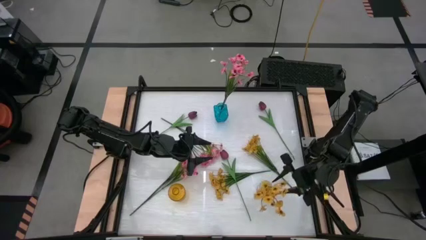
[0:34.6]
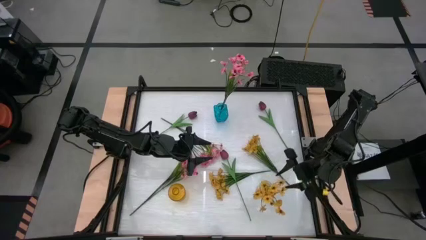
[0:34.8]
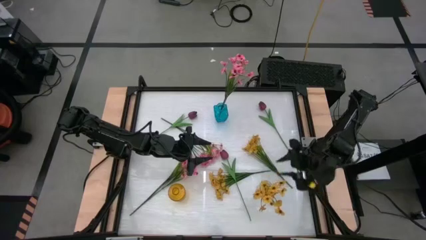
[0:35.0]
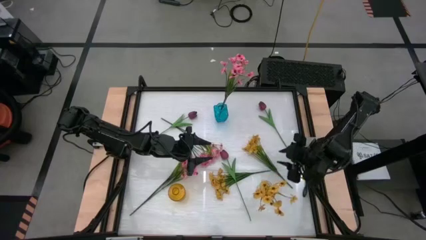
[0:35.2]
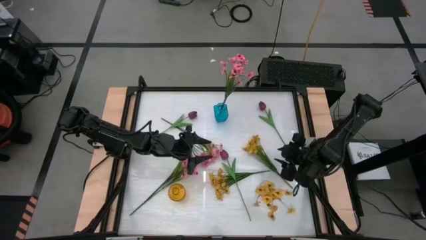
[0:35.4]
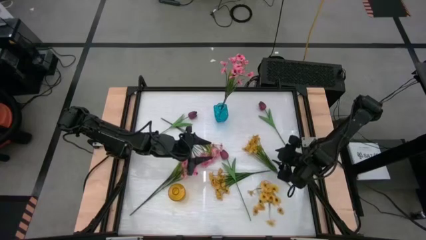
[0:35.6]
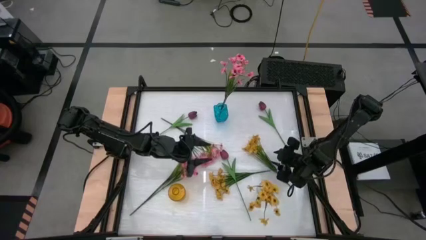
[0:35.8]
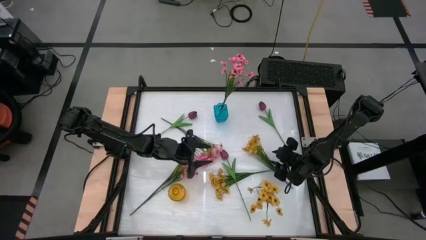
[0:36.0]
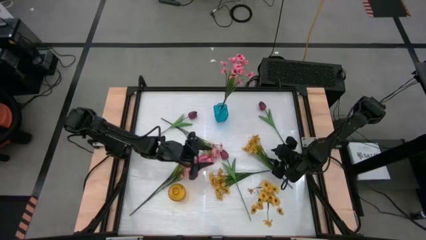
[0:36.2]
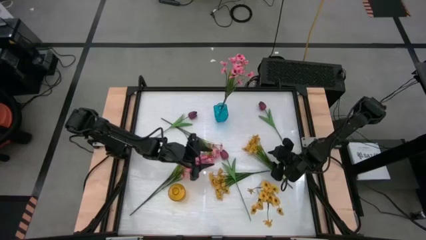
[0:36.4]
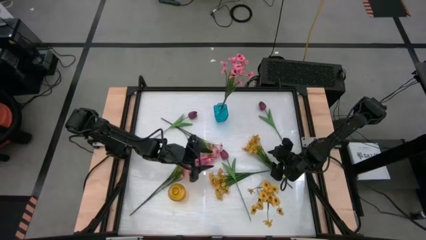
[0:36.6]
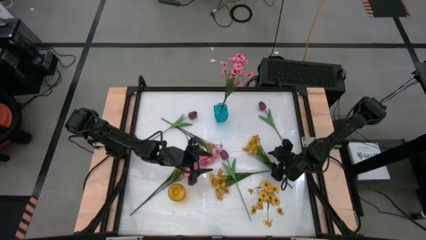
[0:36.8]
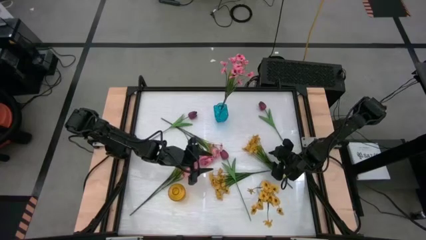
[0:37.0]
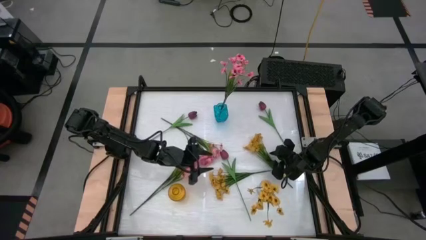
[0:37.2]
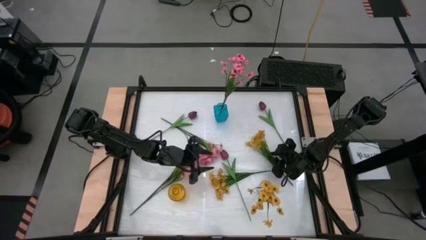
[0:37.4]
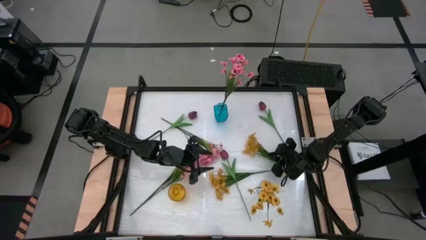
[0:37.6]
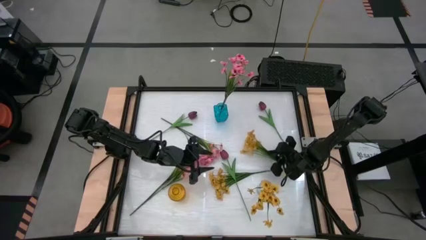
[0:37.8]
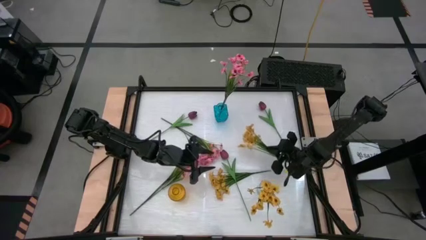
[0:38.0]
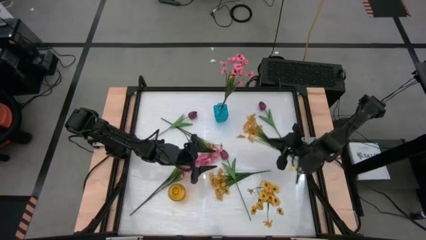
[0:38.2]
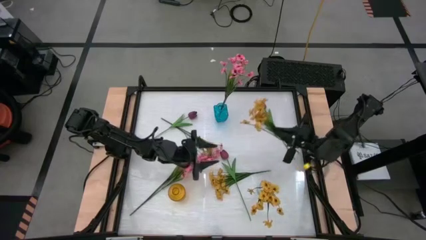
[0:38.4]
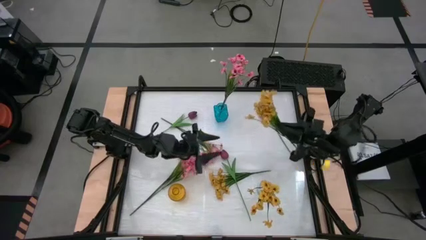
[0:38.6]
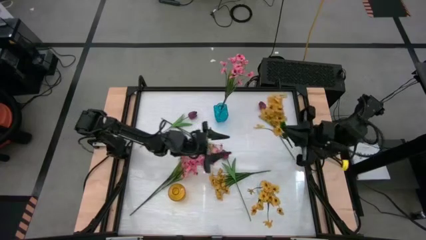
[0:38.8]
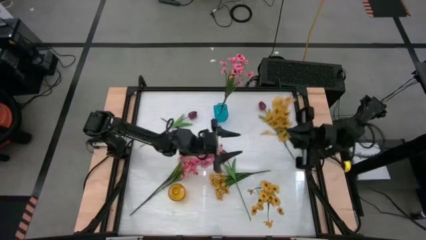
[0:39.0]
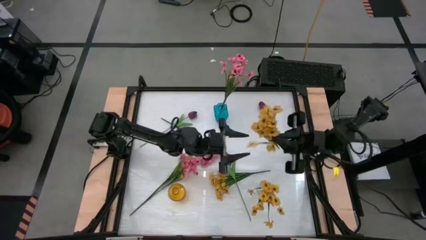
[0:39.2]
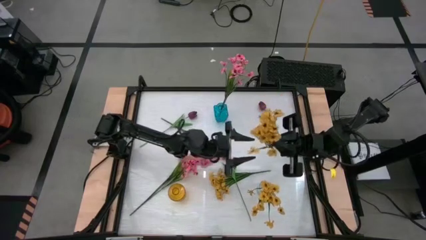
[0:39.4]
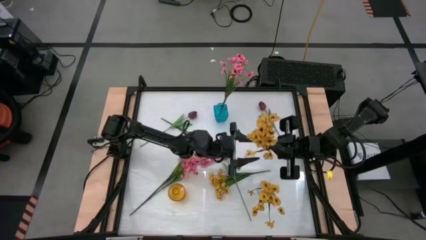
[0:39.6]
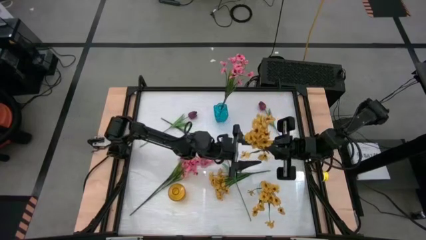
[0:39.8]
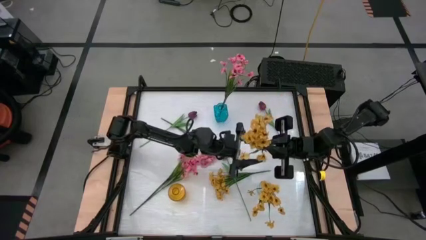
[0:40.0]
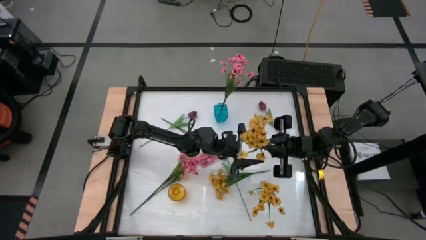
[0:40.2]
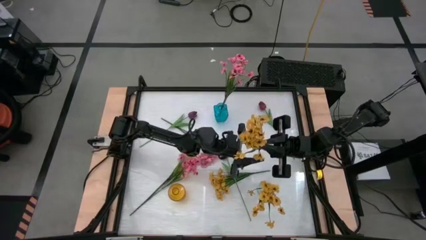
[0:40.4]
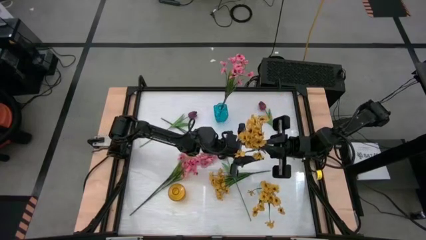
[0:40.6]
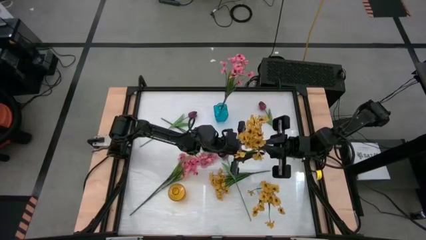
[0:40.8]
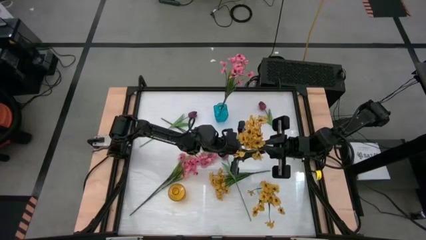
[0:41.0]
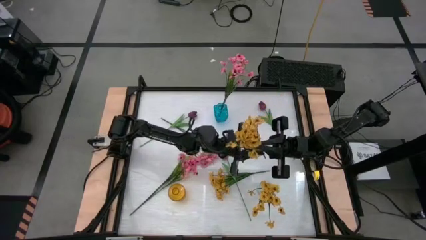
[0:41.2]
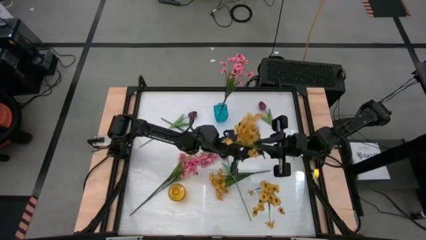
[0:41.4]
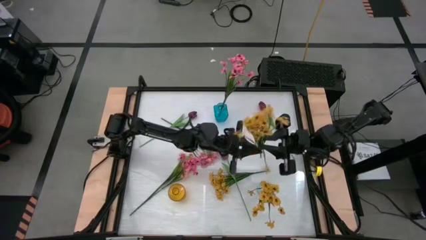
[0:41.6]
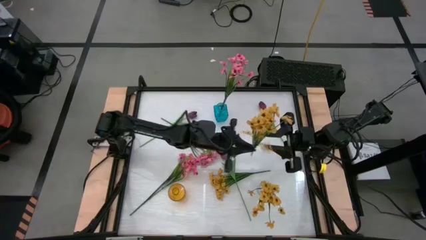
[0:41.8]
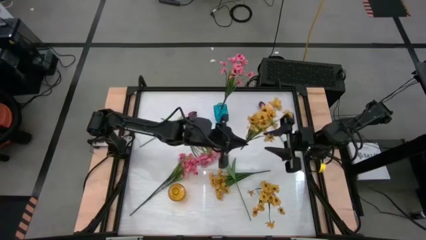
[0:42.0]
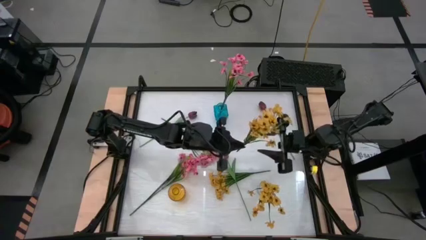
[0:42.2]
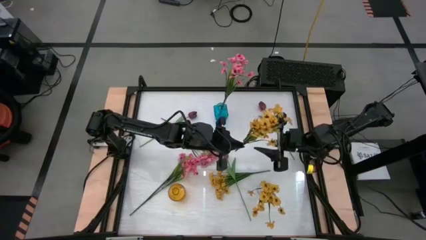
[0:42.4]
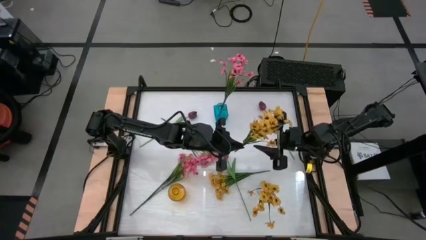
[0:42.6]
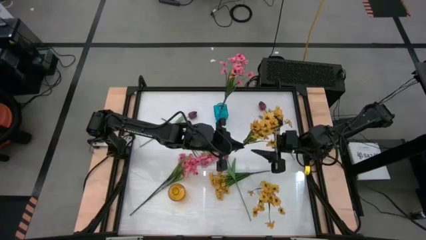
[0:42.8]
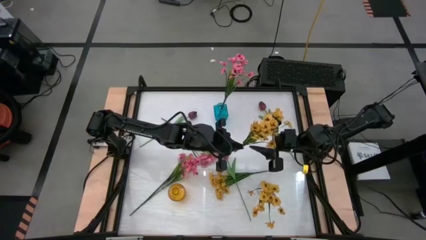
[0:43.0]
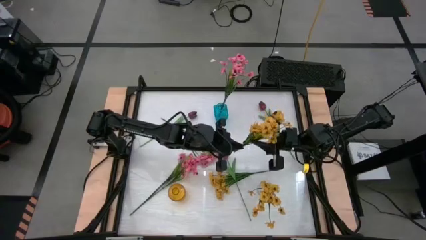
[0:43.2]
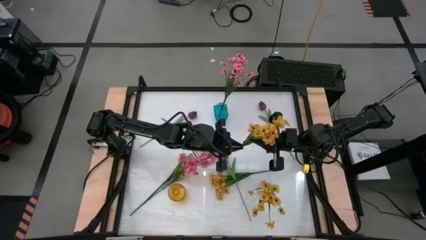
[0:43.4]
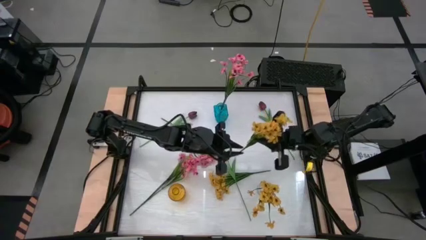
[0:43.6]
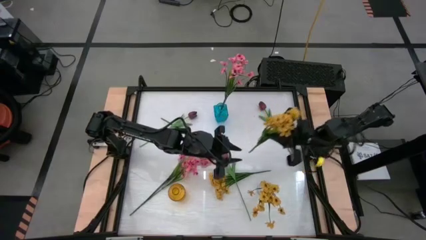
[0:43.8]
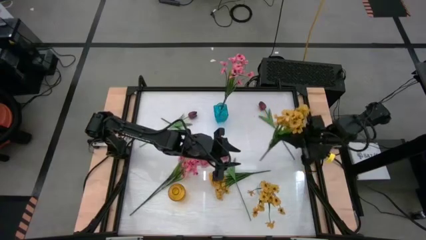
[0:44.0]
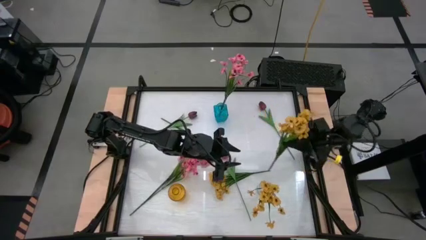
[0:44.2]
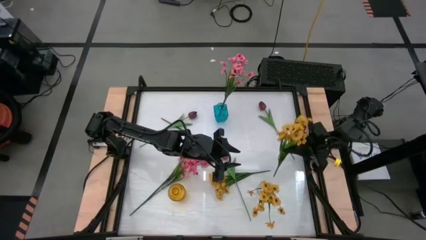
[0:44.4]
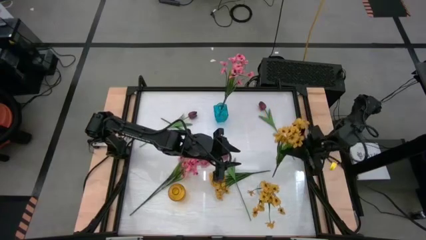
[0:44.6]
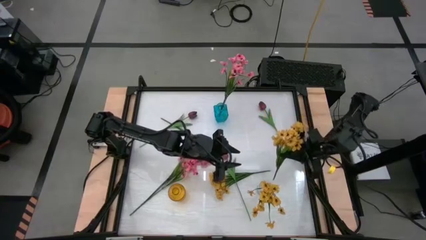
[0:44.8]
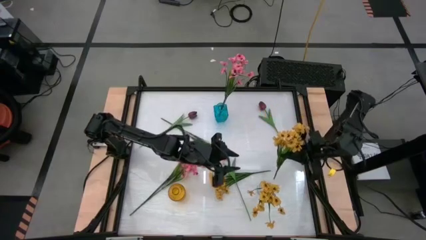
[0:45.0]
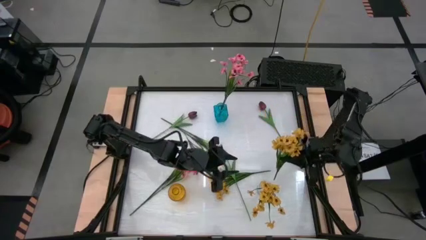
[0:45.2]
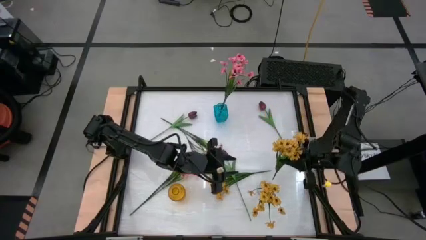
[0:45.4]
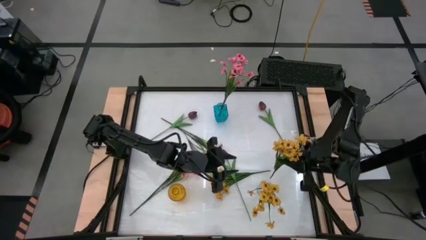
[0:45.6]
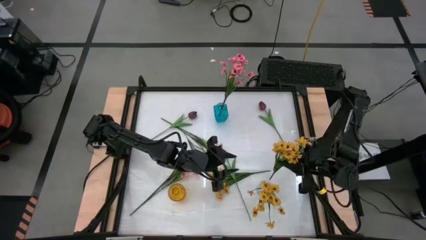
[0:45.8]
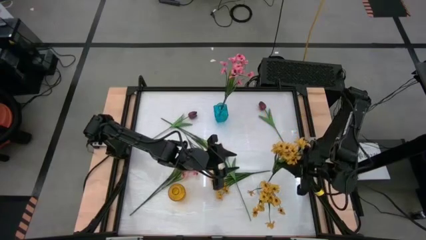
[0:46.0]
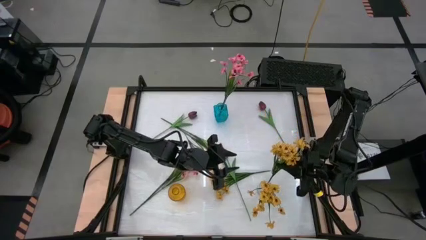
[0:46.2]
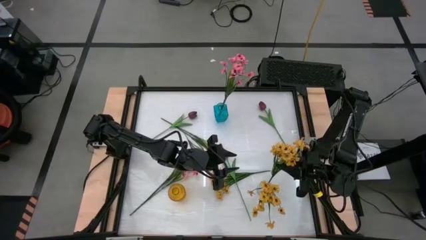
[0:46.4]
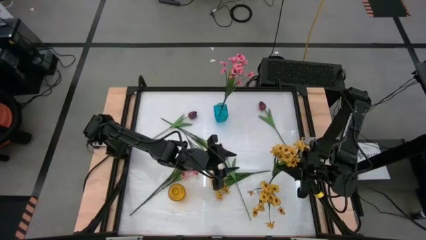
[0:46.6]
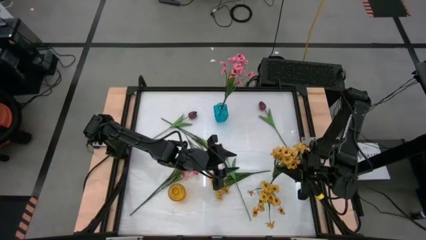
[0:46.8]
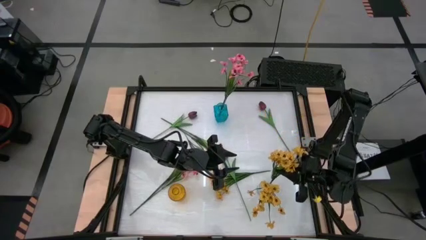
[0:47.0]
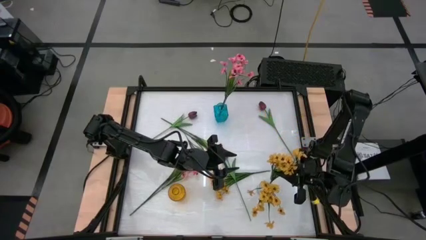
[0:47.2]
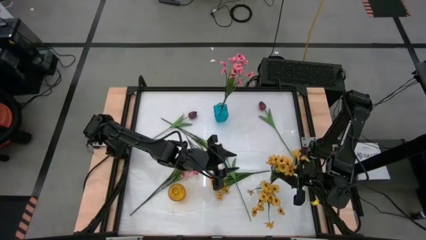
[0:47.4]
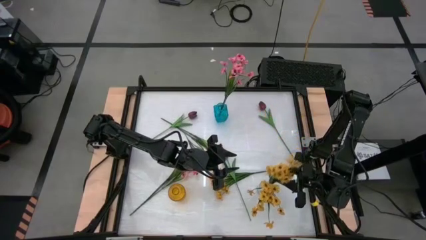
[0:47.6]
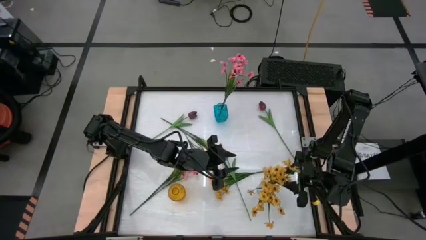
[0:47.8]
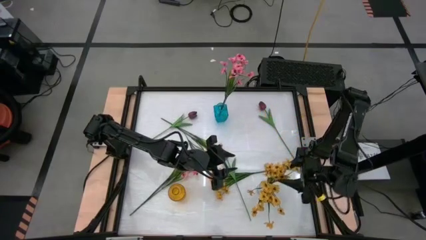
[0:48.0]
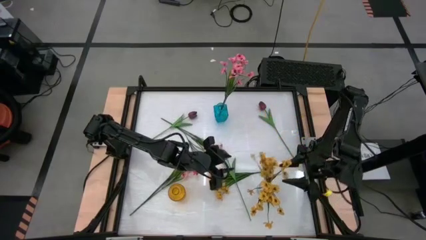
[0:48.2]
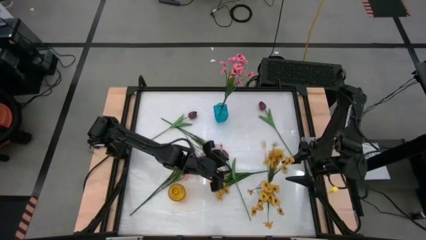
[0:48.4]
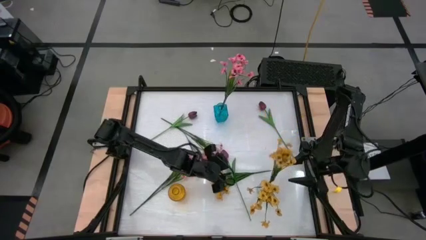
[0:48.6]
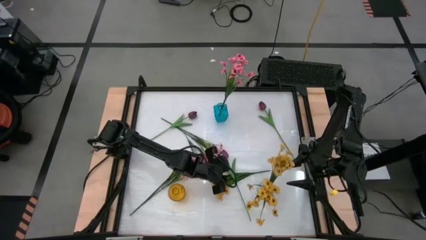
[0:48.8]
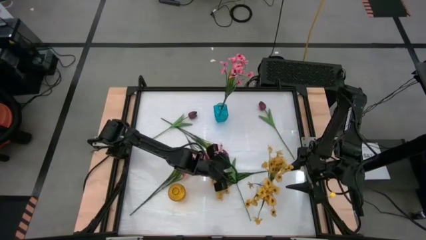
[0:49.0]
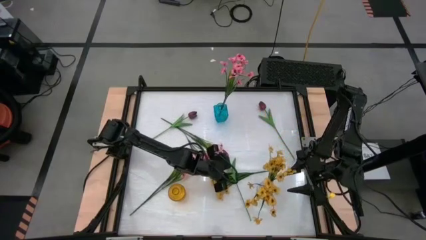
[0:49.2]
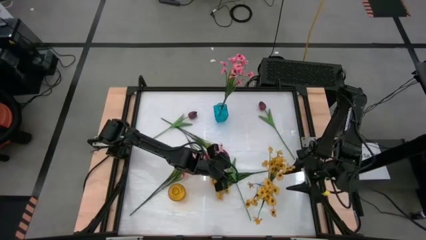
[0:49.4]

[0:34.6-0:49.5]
Task: Sort flowers into vase by color
Put the right yellow flowers into the transparent vase

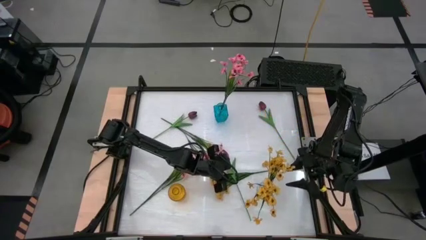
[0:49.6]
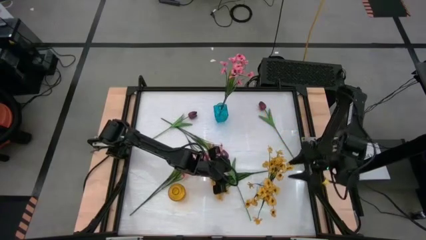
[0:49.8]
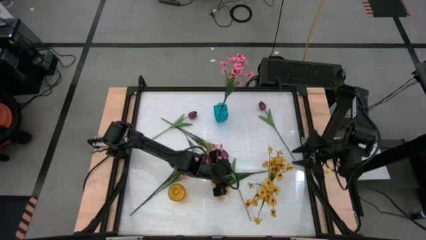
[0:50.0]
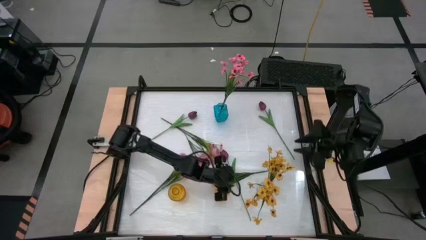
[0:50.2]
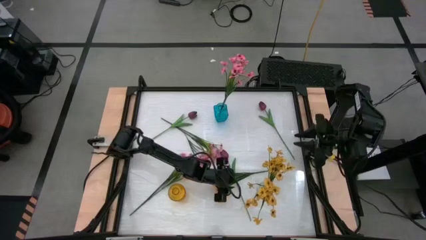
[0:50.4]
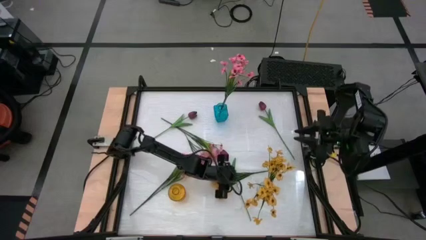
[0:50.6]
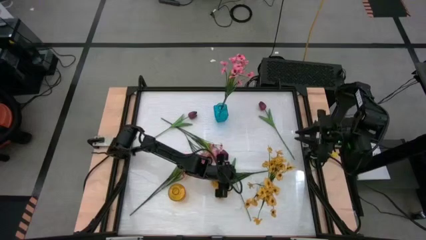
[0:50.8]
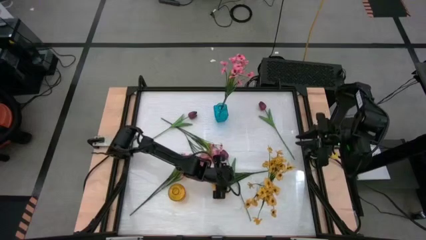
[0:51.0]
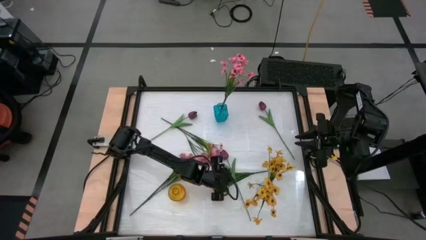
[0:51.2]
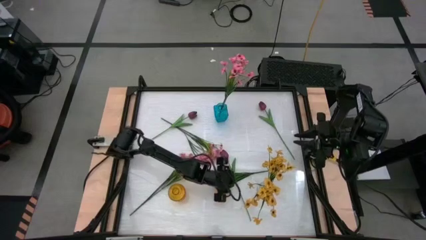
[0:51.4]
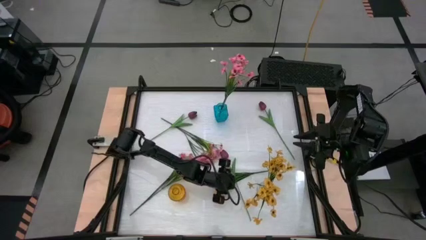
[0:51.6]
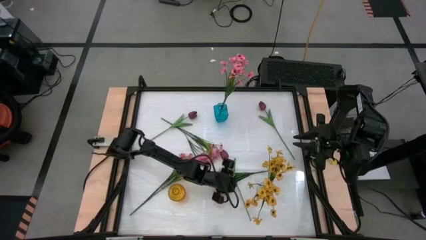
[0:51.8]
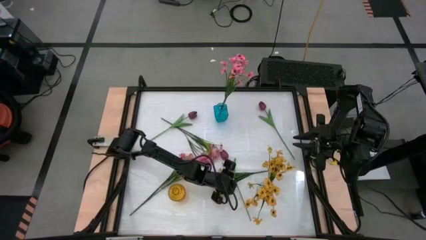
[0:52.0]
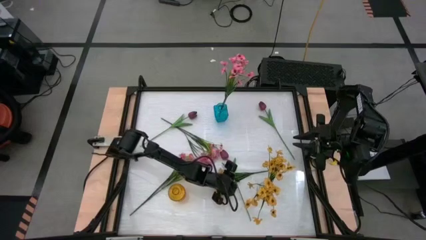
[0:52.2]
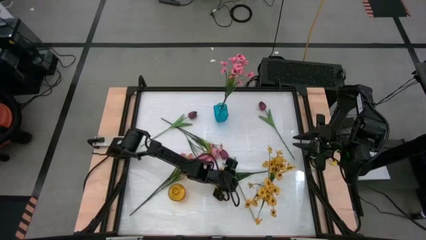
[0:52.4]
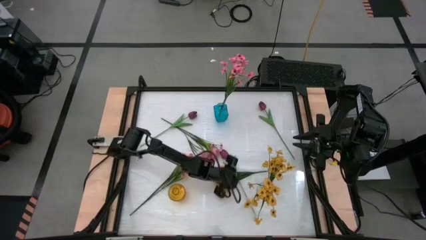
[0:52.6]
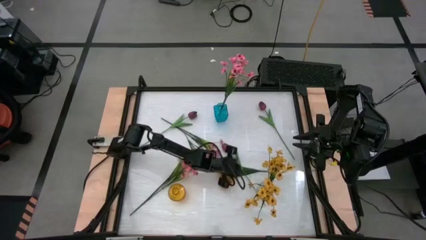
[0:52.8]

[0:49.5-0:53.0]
Put the bottom dark red tulips into the yellow vase
